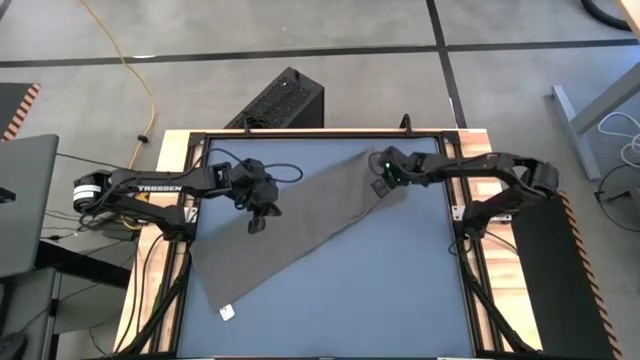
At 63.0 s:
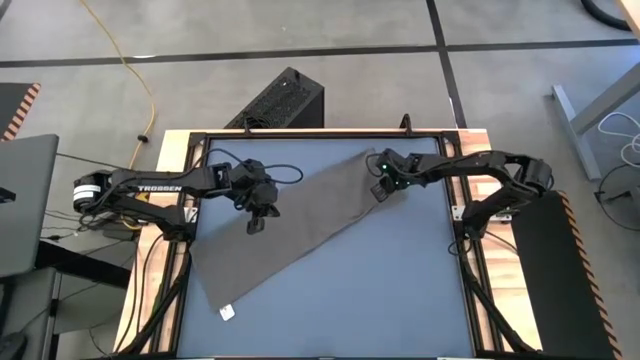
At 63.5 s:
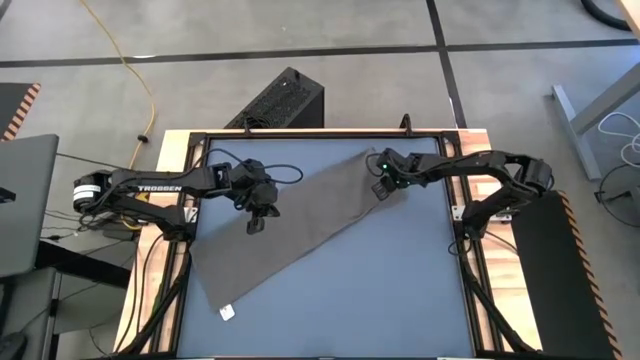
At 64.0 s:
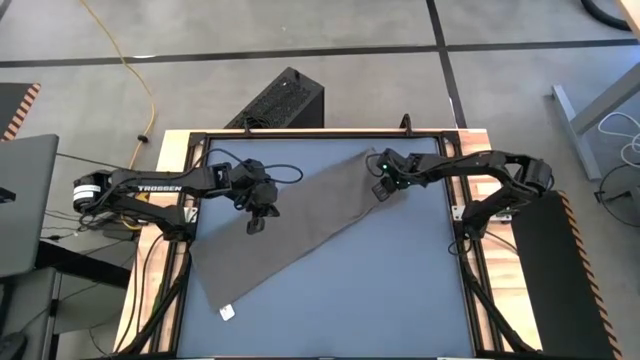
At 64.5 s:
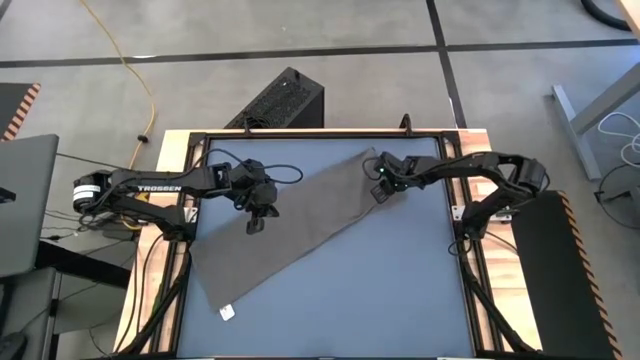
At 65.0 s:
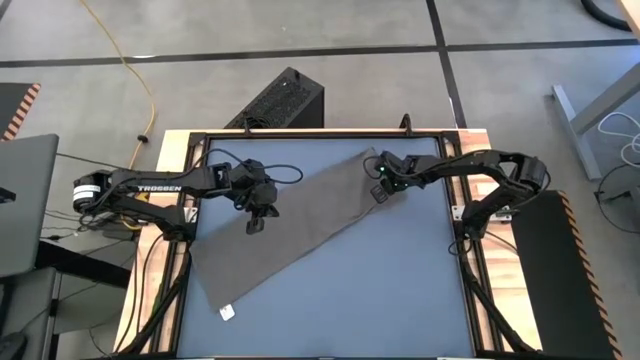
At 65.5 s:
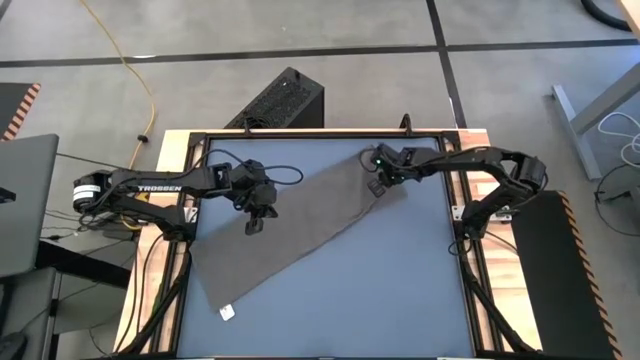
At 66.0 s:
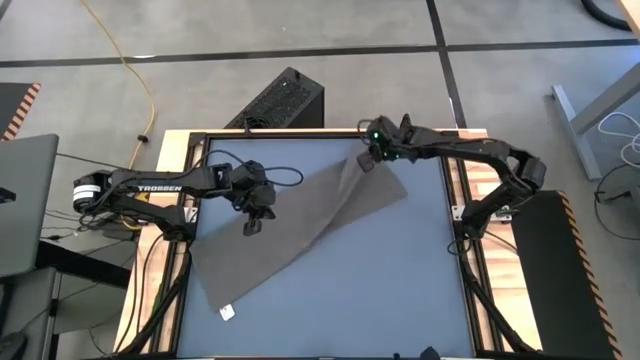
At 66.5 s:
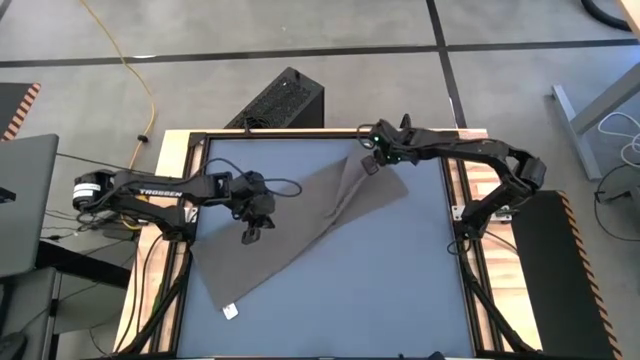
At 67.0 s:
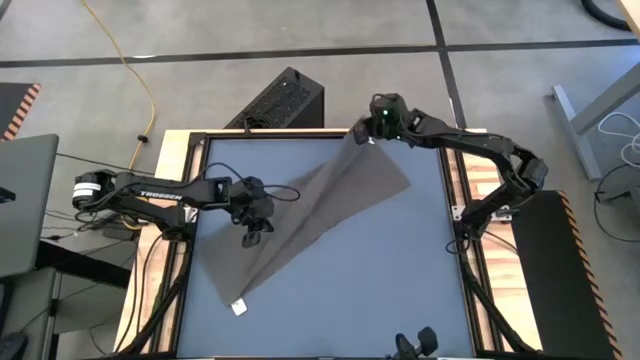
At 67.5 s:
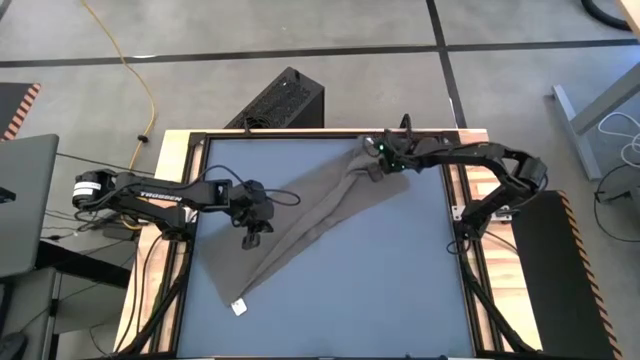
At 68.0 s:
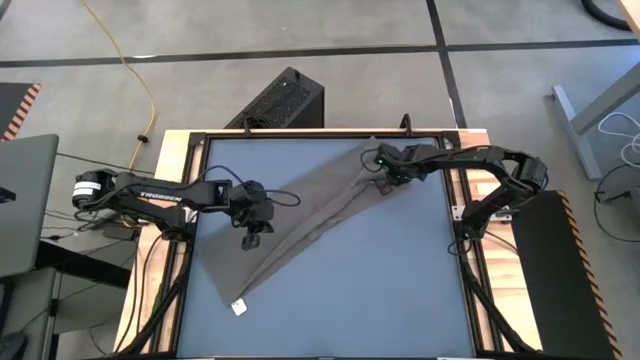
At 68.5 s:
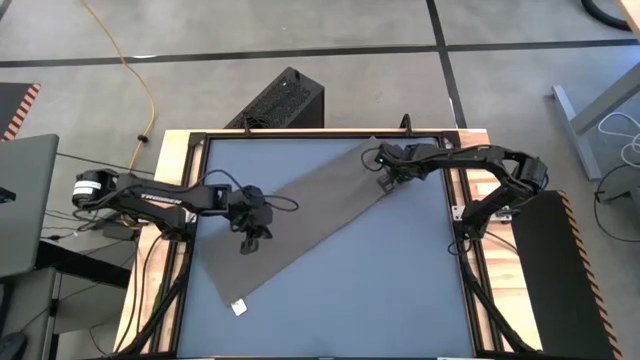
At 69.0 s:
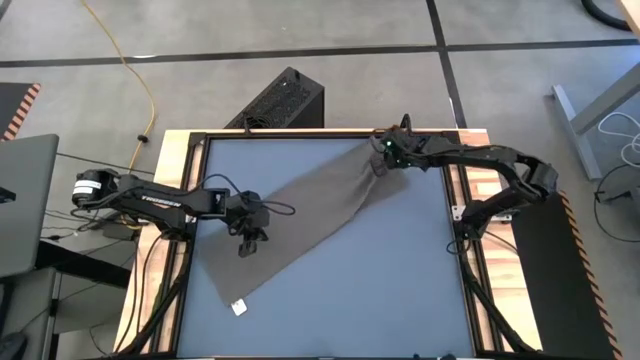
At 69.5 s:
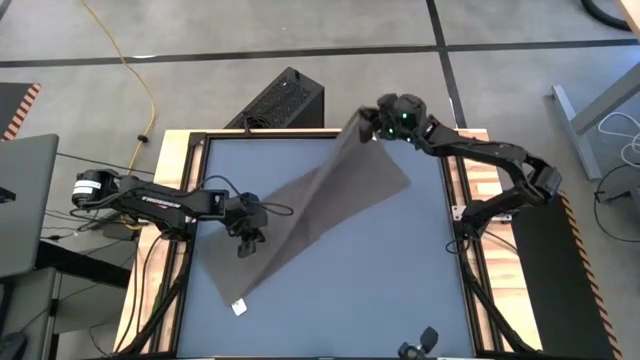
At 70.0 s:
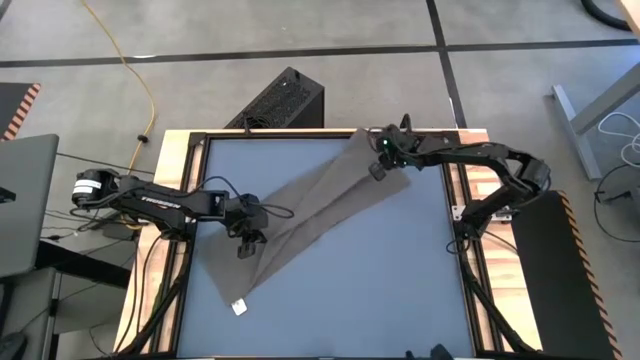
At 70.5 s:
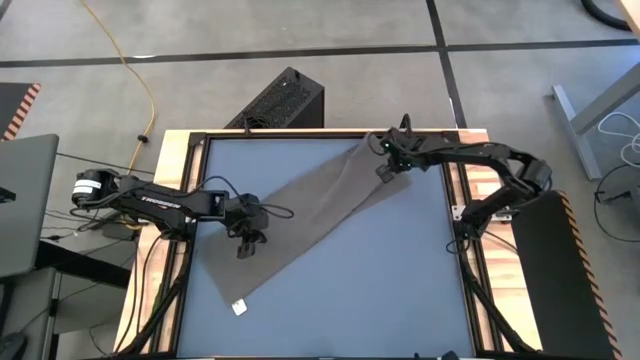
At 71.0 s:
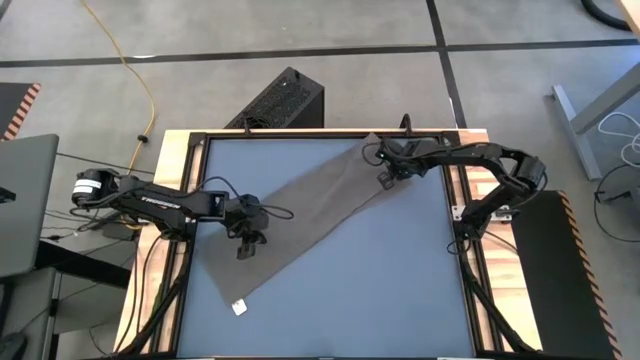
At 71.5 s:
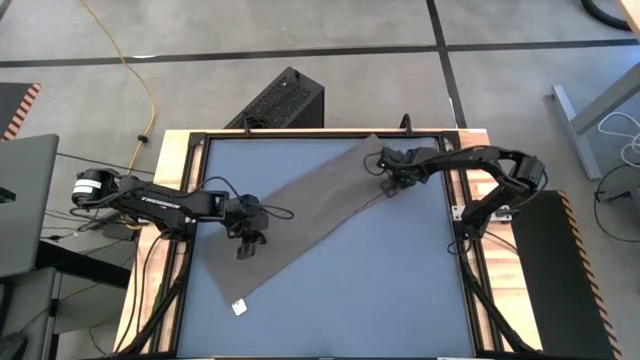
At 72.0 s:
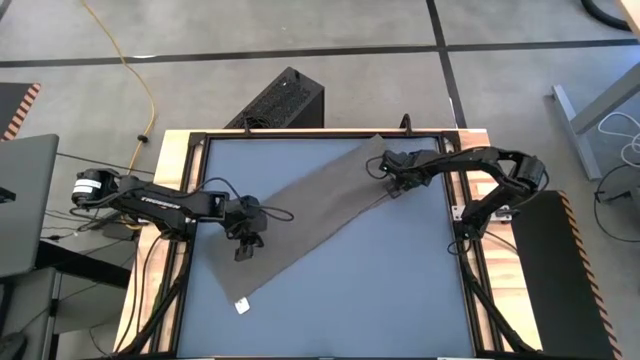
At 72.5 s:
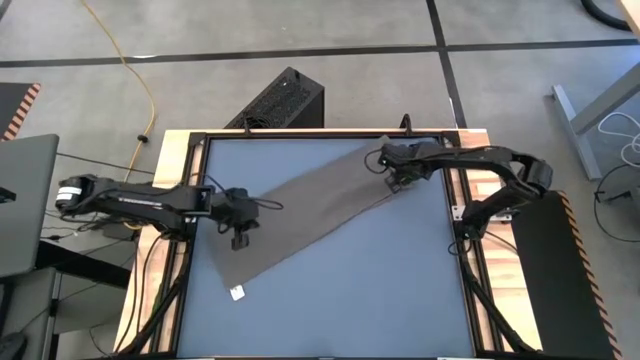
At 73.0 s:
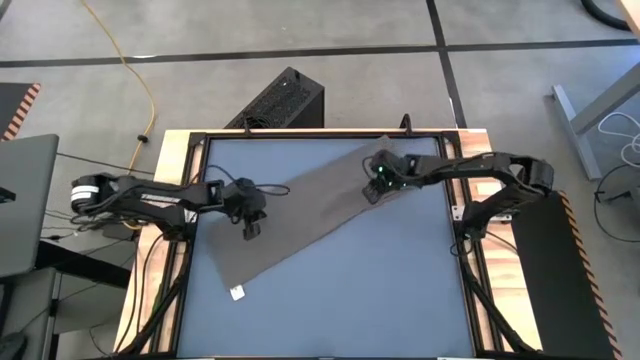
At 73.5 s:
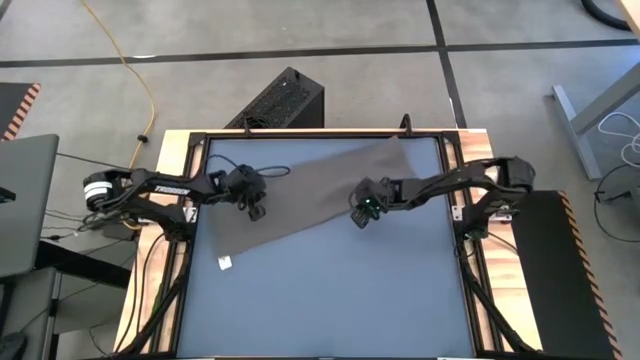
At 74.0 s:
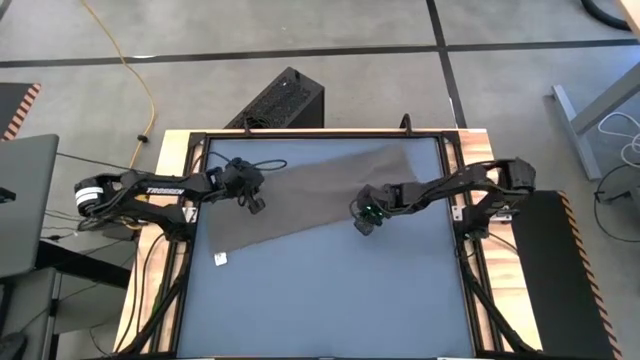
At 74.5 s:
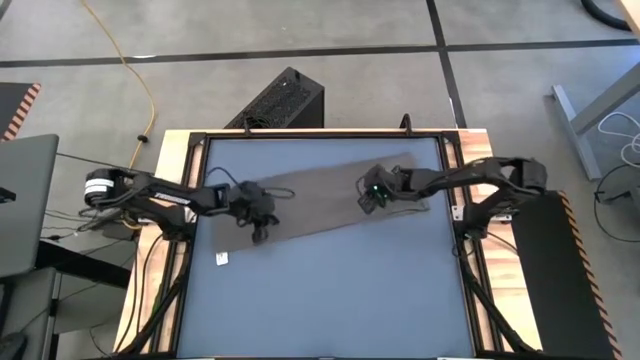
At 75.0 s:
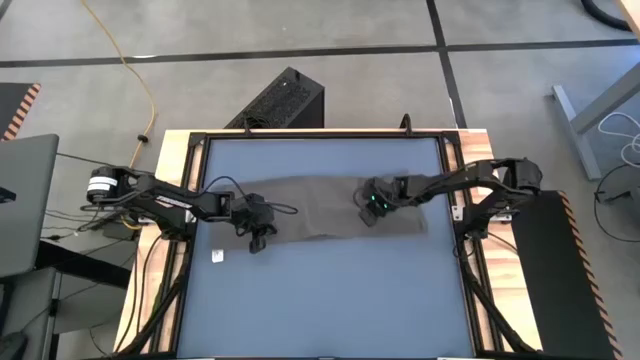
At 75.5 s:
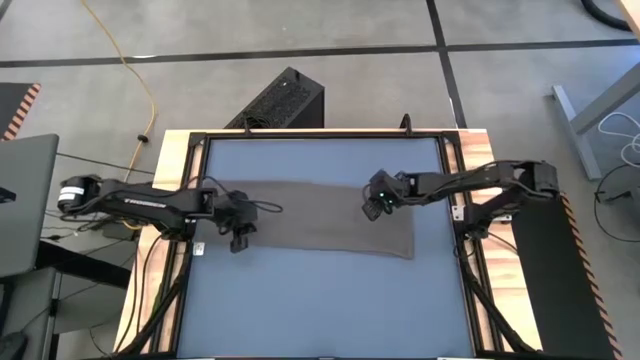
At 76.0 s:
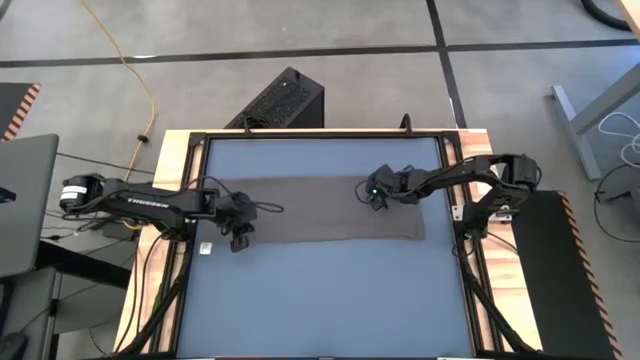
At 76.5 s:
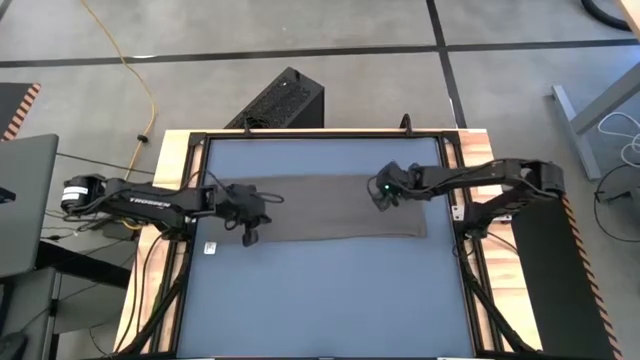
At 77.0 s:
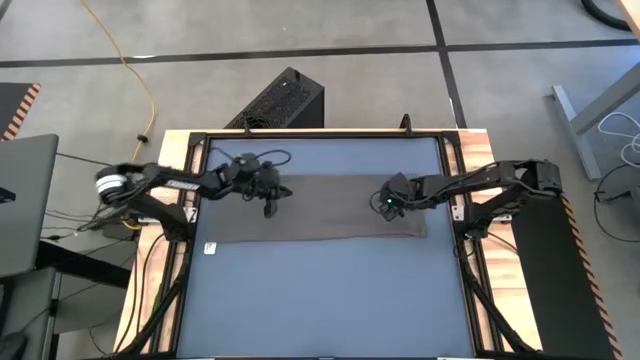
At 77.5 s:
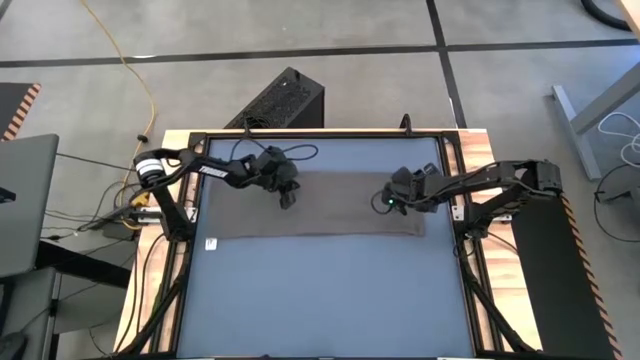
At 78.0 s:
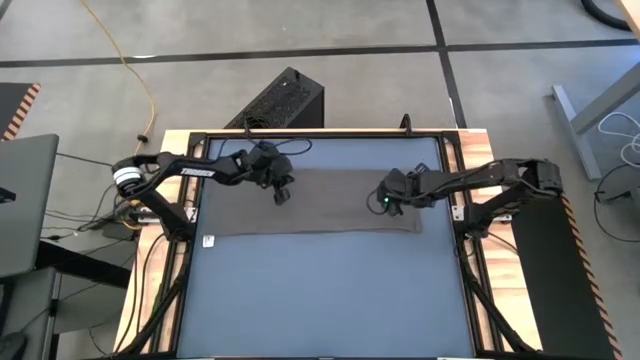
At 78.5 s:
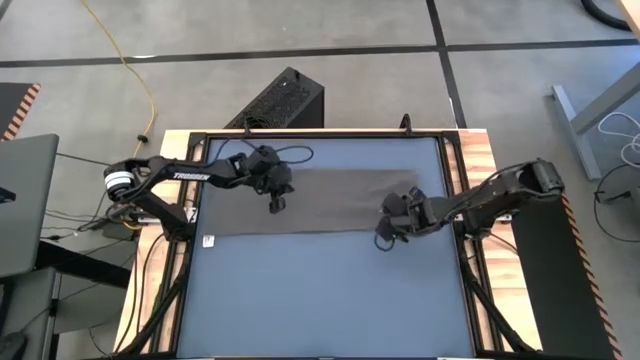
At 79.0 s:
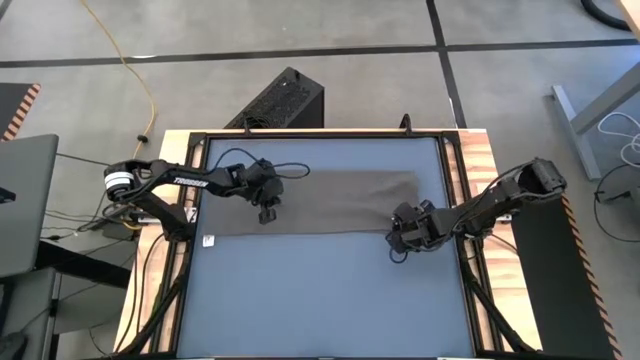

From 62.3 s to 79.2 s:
Task: Roll towel into tight, uniform cylinder
Fold the gray towel

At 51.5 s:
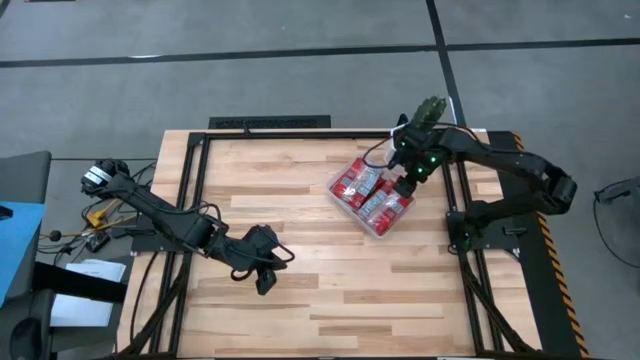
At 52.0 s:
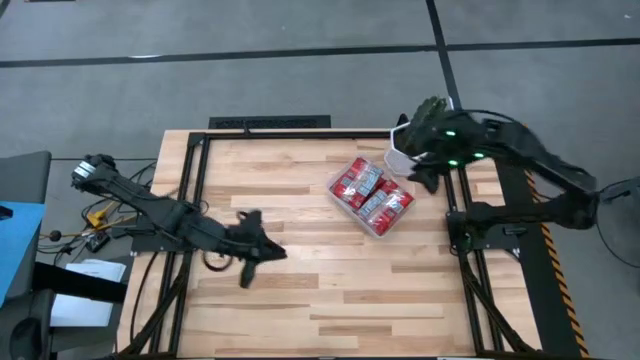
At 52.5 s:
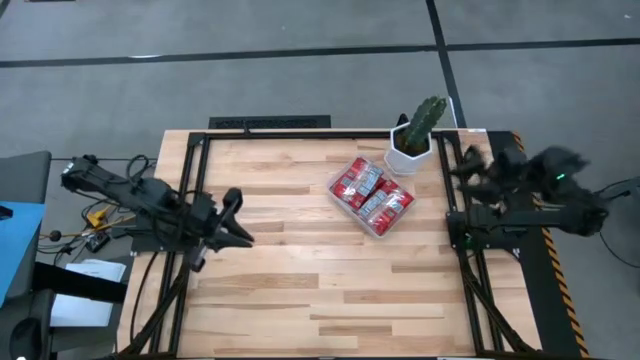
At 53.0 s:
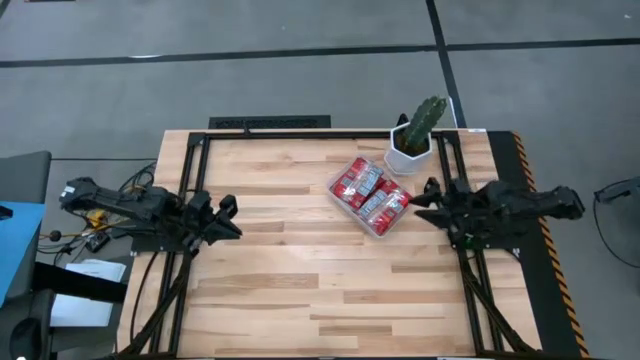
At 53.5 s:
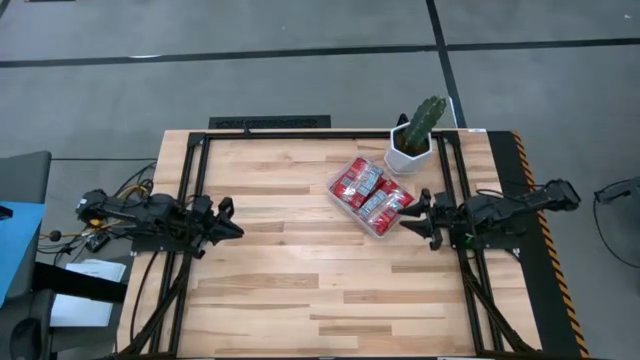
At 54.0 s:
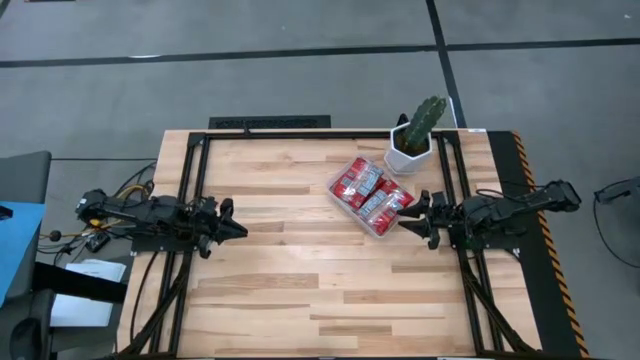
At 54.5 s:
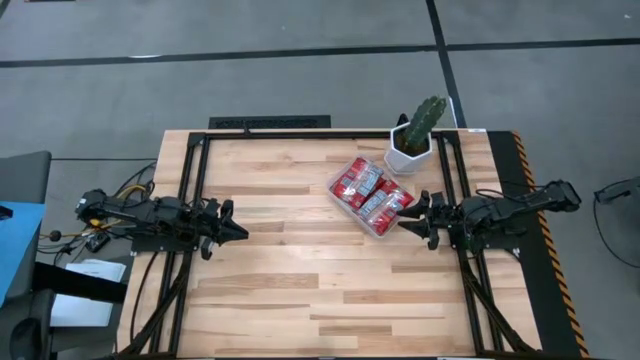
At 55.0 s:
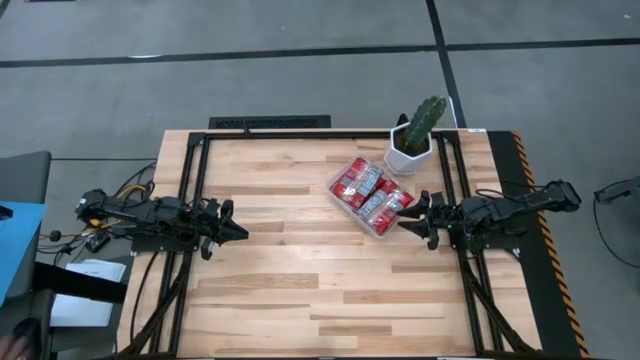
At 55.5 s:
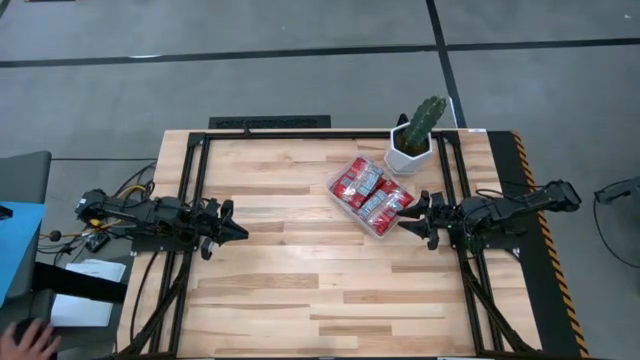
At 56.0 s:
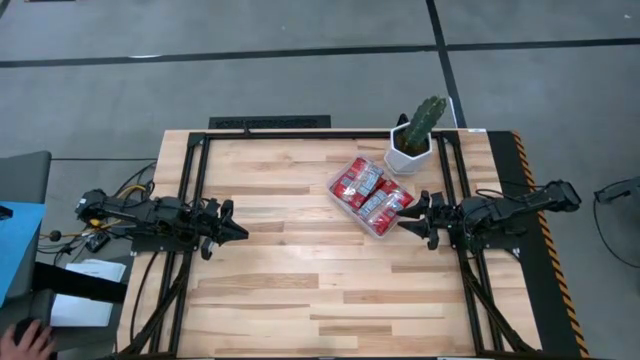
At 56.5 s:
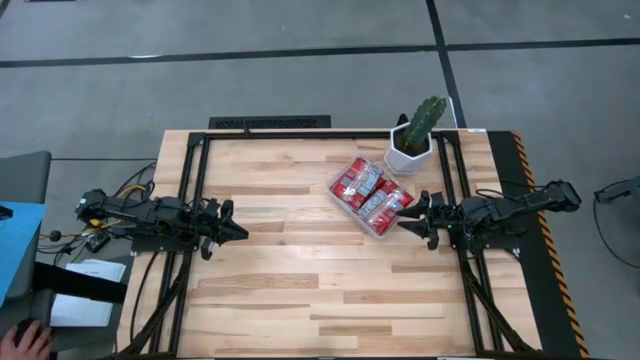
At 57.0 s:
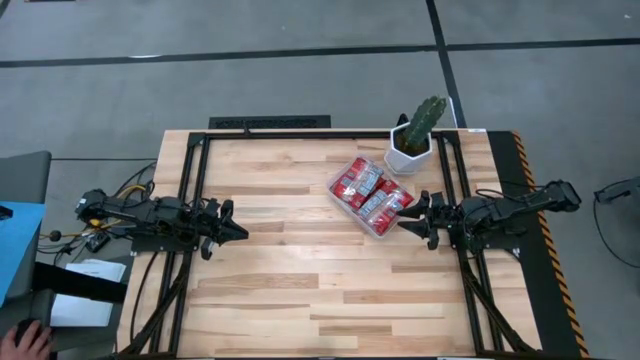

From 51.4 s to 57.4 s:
Task: Sort popcorn bags into baskets
Return to Home Position
